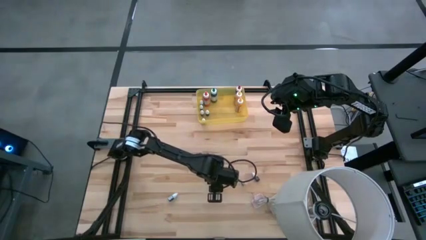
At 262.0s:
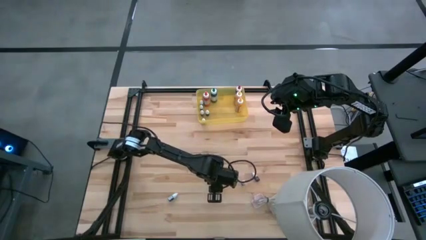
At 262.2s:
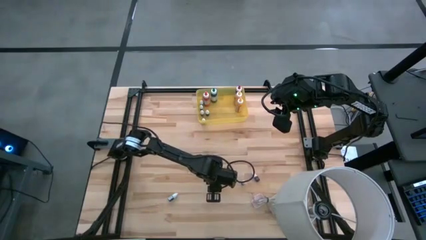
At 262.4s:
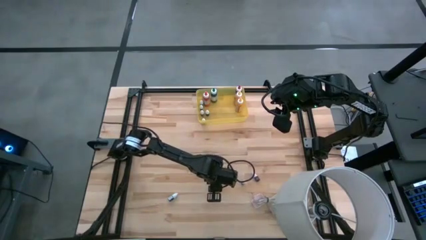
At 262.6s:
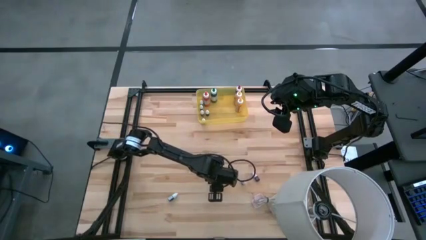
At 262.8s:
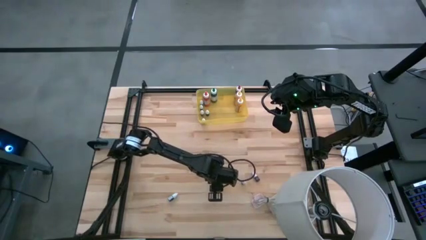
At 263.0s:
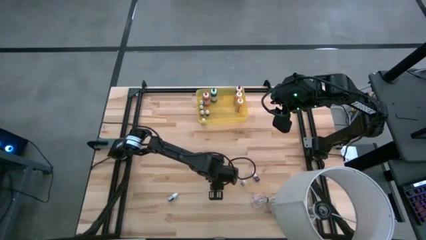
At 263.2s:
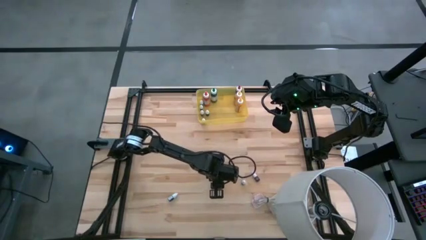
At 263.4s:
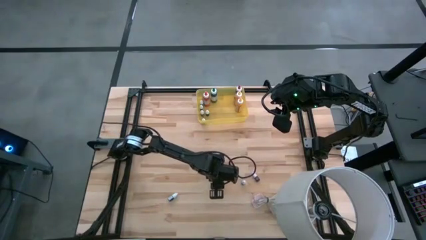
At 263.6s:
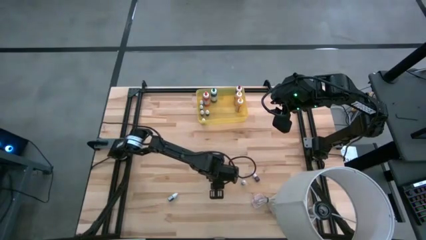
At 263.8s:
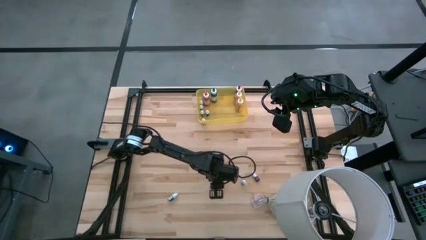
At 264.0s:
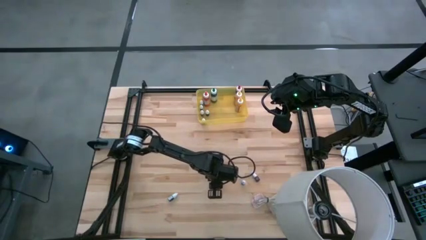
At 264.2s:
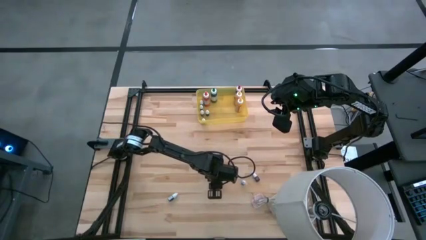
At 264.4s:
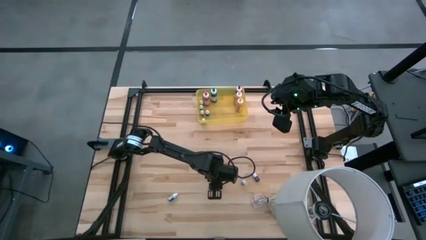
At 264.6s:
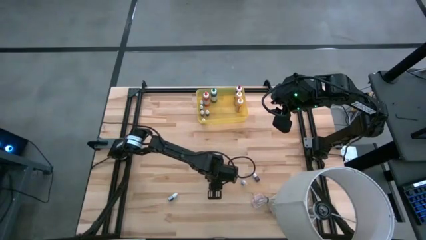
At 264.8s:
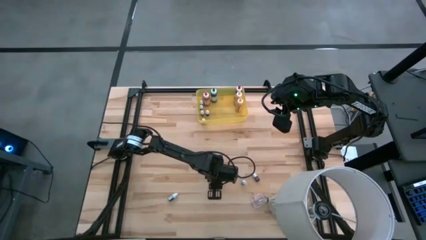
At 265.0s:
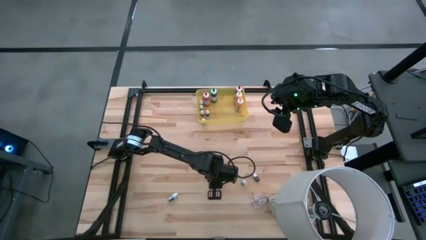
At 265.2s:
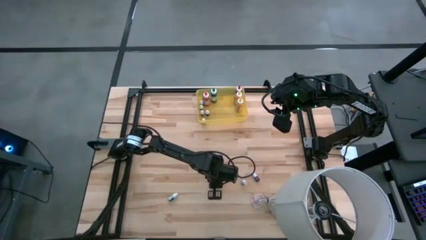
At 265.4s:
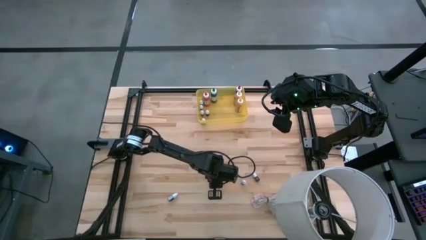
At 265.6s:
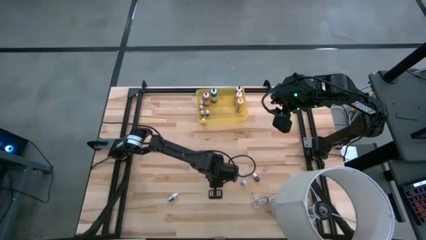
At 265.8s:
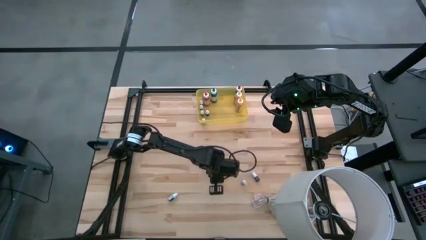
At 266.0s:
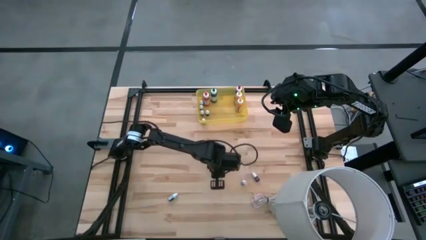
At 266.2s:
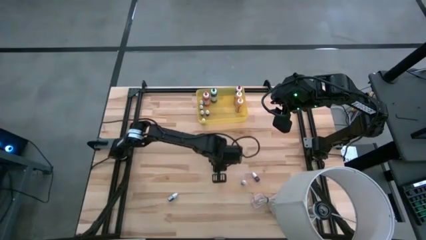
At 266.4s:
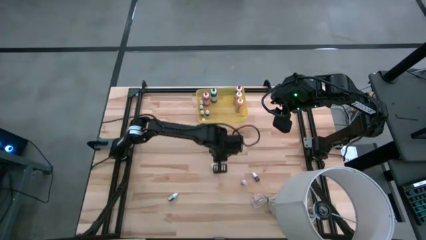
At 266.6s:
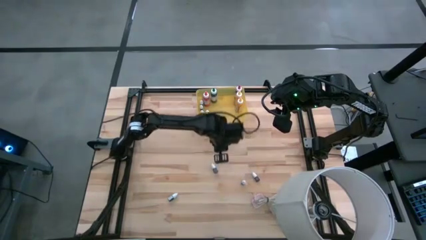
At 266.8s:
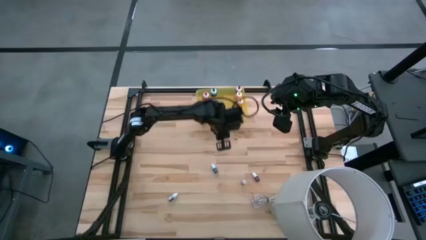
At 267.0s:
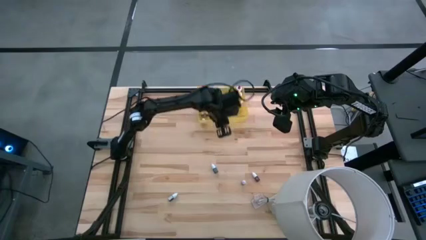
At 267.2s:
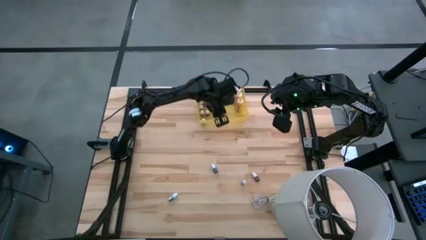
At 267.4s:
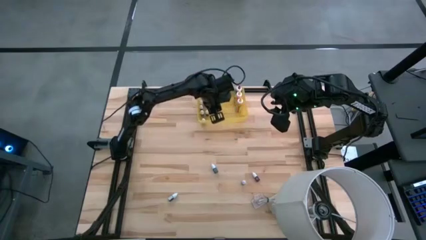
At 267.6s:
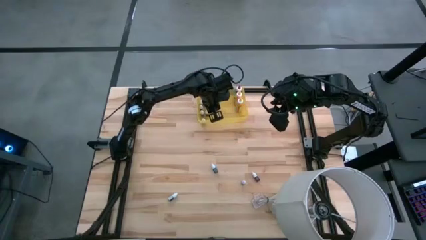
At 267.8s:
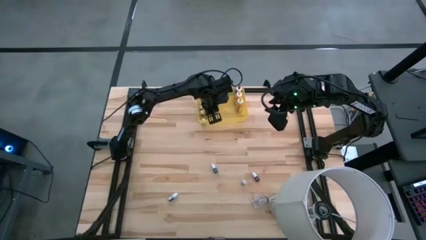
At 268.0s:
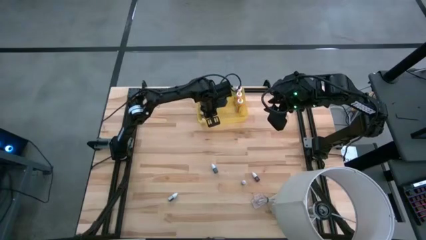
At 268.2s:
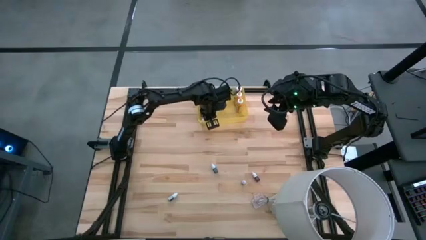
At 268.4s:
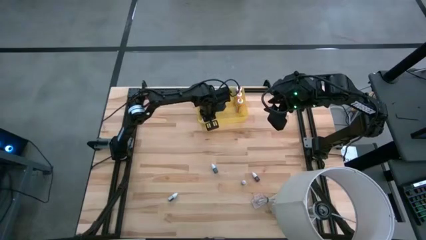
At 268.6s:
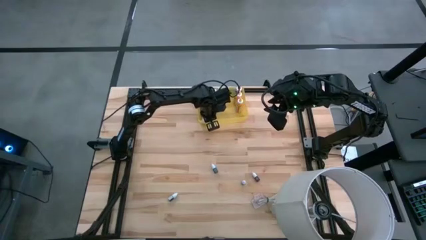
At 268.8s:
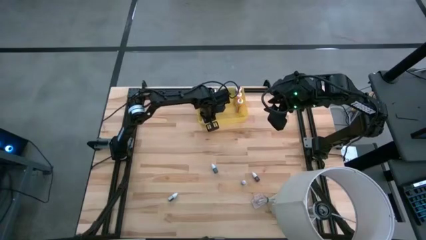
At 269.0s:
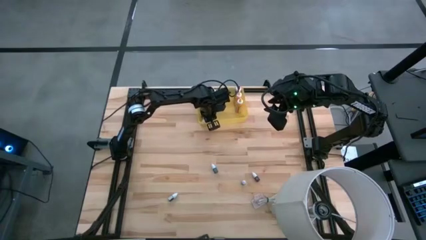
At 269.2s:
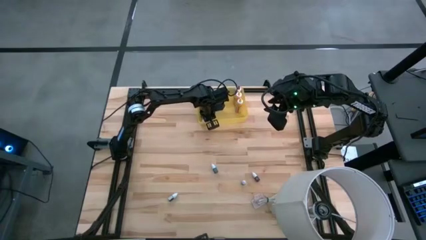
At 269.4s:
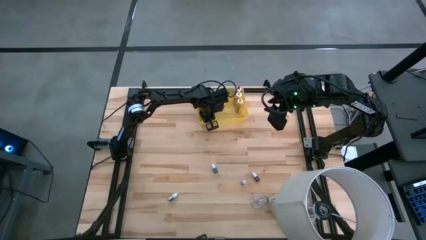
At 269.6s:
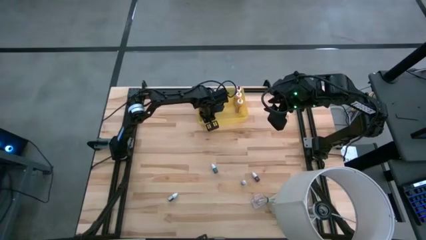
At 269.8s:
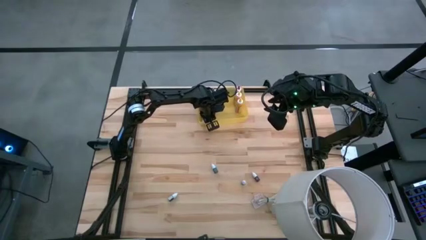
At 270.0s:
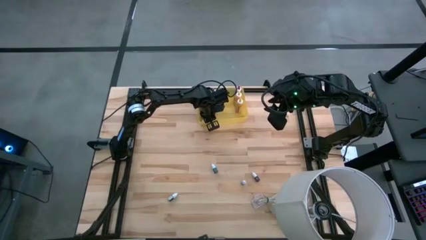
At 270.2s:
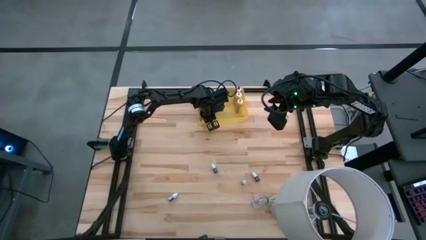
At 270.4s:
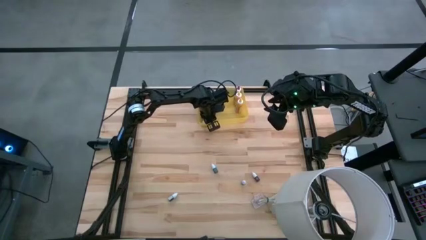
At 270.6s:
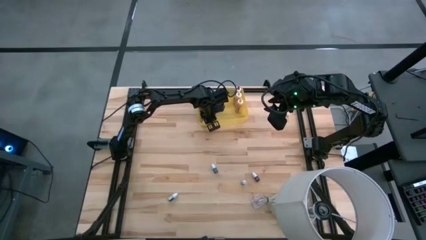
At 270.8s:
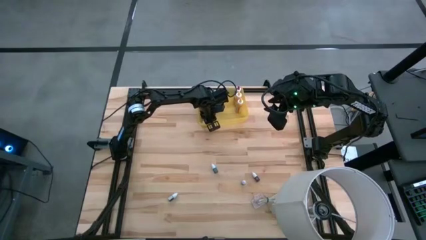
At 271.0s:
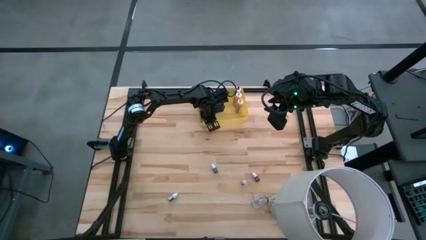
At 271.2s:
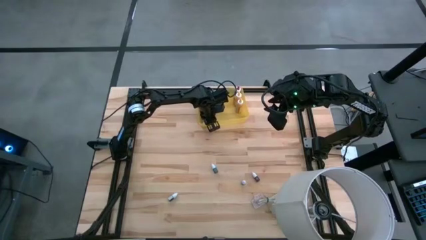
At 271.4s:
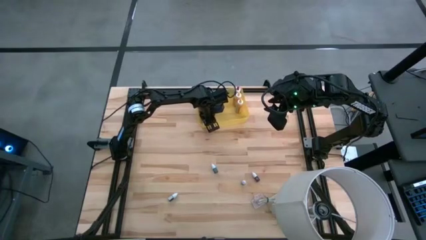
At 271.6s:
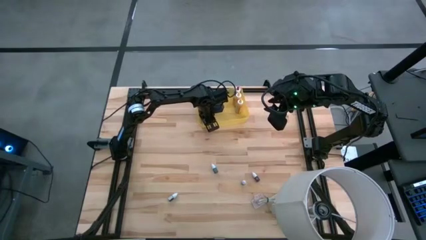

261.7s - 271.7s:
Task: Pick & Place food coloring
Put the small red food coloring bottle into the yellow bin
